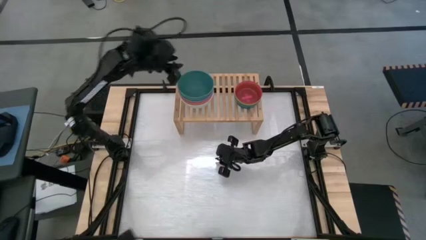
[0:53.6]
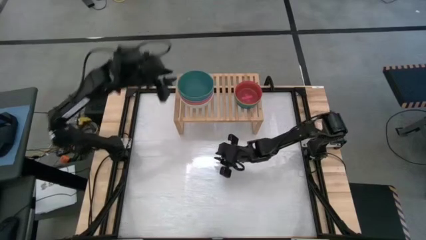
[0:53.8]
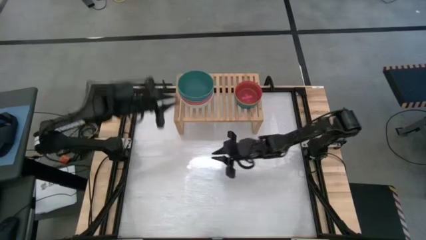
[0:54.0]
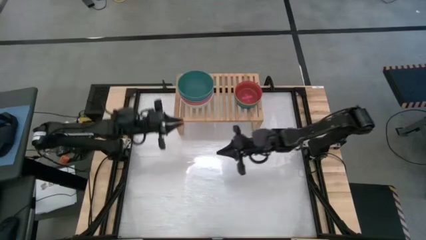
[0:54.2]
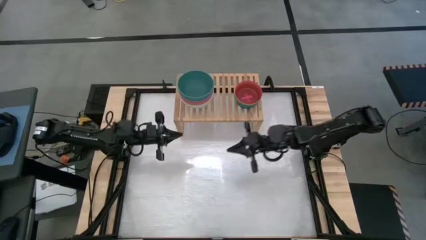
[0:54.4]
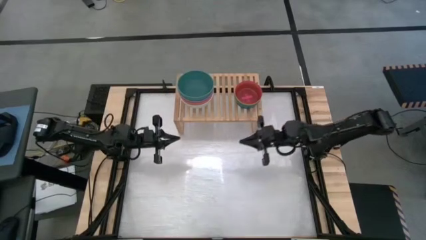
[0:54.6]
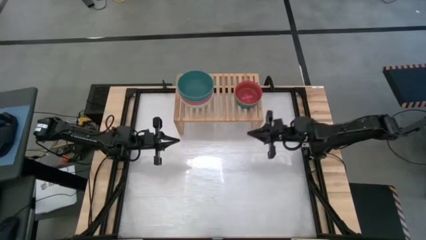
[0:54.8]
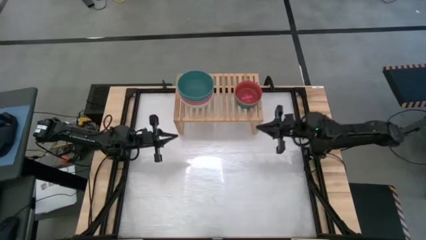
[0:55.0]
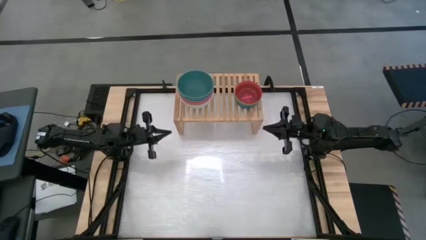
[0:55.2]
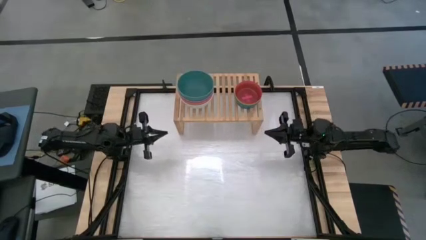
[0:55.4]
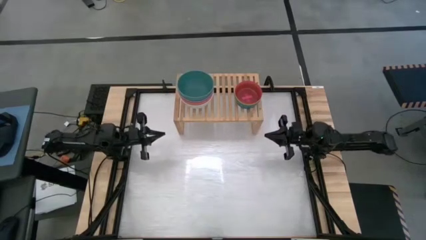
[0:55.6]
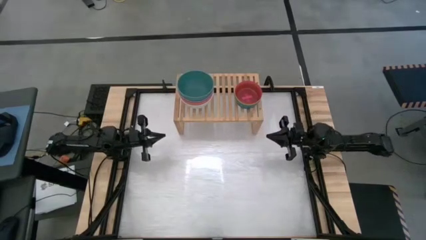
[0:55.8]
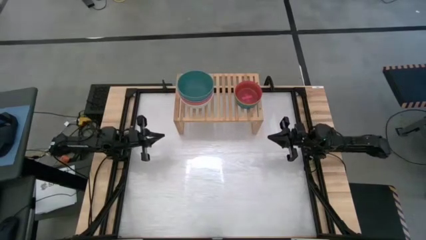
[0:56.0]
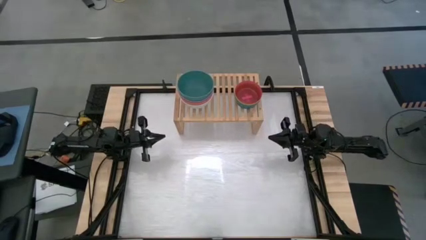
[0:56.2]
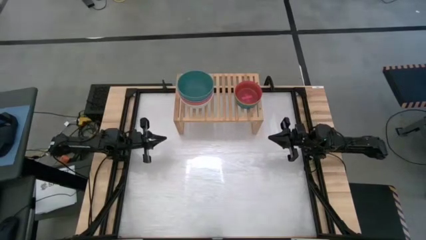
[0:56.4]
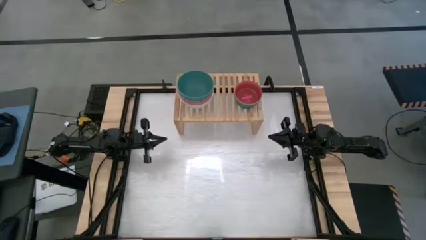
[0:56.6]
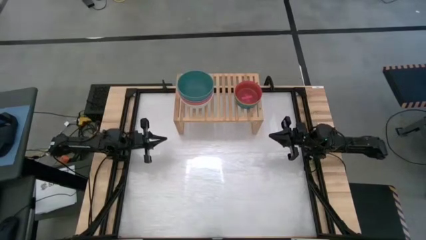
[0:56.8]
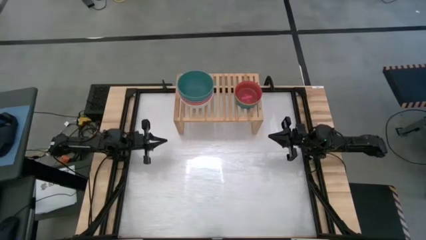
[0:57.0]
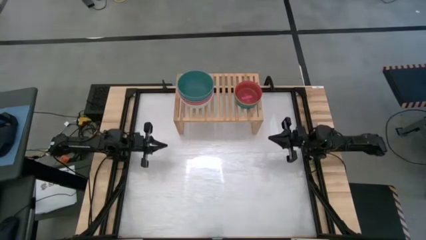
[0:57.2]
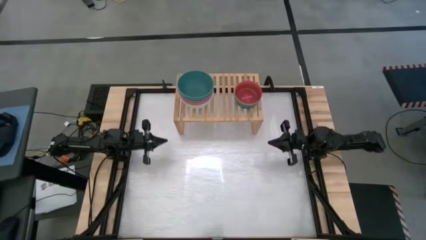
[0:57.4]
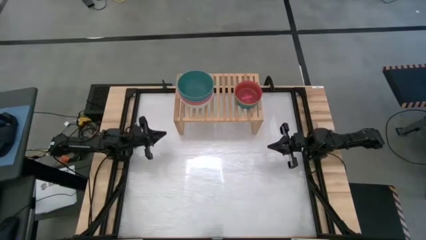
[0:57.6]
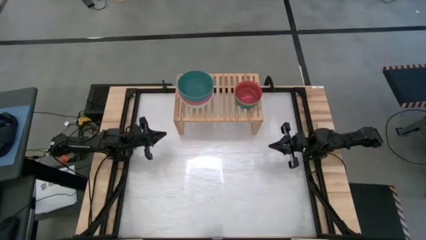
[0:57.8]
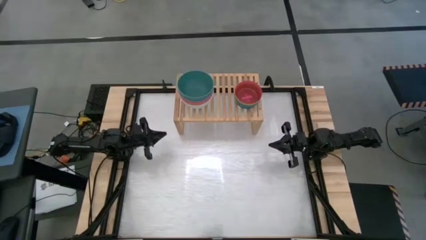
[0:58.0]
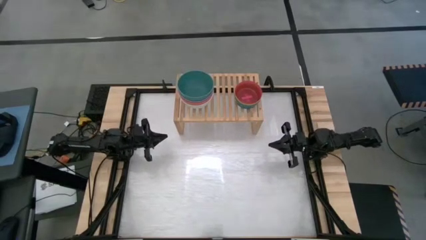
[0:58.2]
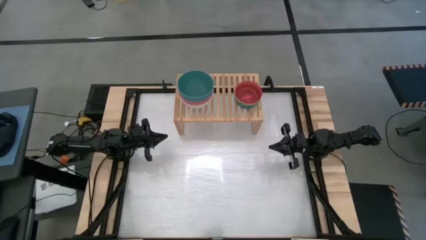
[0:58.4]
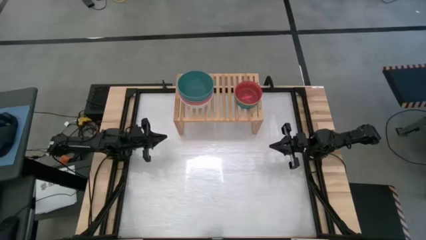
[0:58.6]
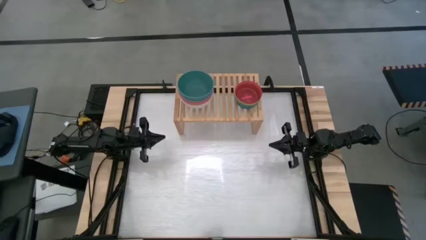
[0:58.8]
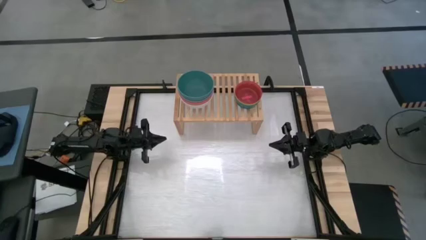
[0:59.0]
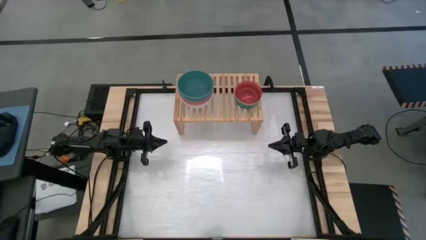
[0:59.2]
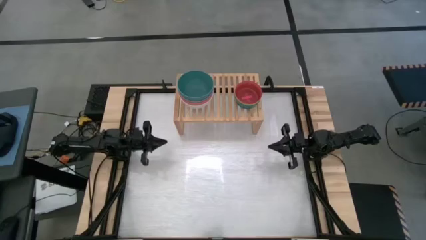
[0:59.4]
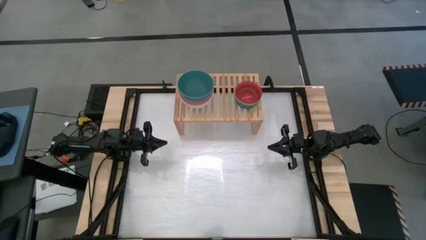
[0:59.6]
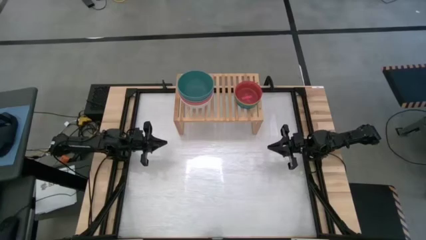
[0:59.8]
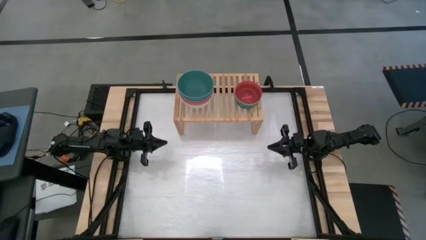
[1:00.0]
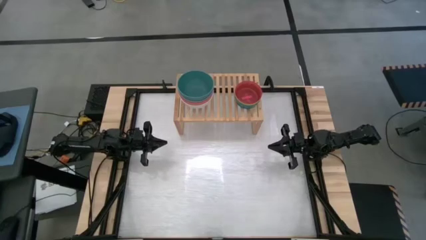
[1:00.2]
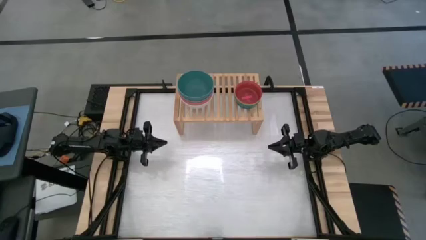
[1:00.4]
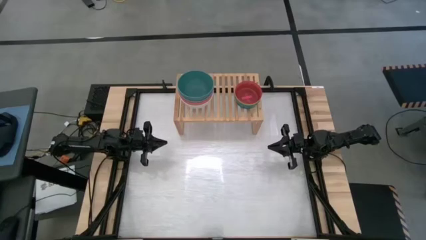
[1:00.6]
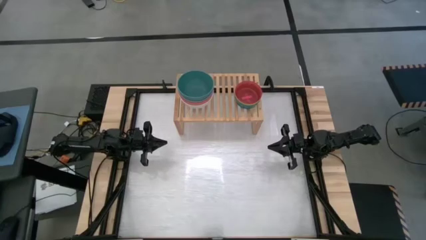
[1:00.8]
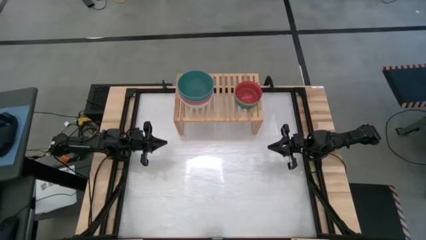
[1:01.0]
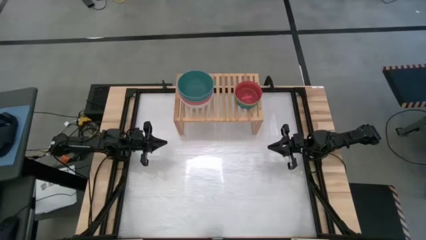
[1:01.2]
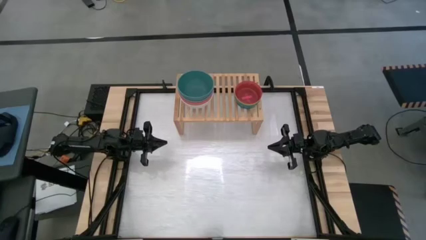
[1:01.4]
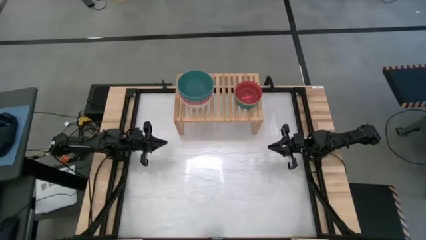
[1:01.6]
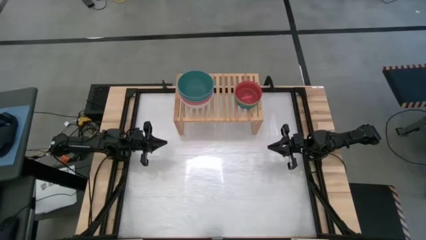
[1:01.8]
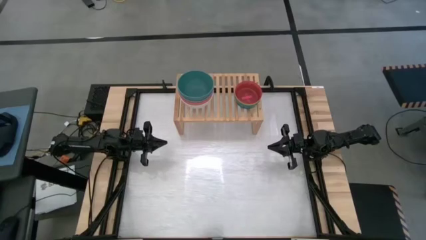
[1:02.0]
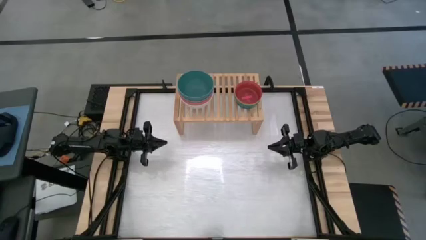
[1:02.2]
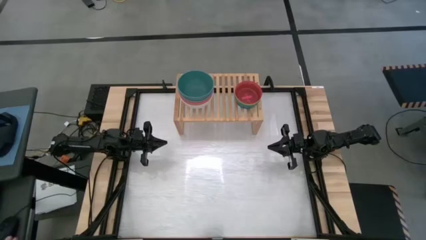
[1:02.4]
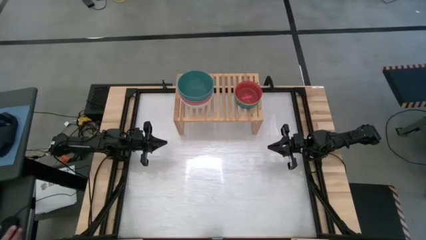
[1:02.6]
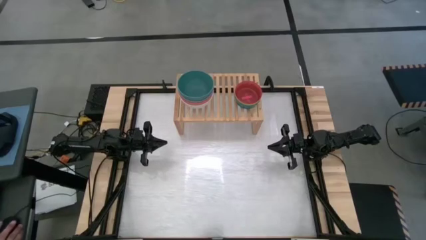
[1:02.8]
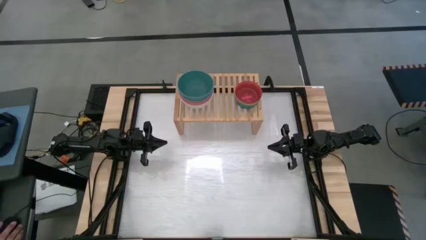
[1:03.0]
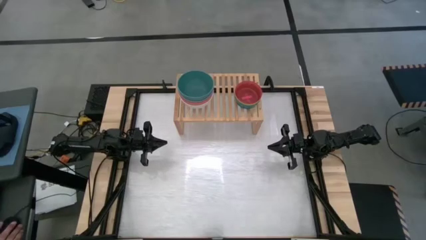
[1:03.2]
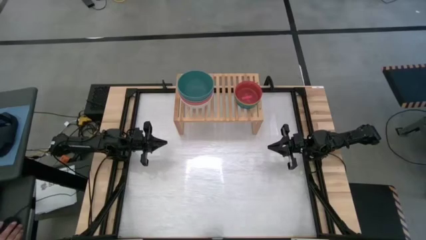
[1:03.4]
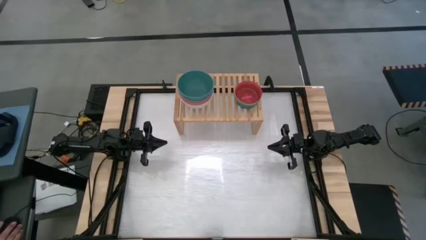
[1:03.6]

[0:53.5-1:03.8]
Task: Place and stack bowls onto a shelf
Return to Home Position
